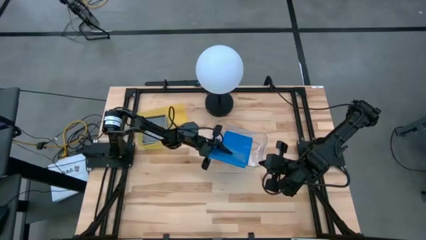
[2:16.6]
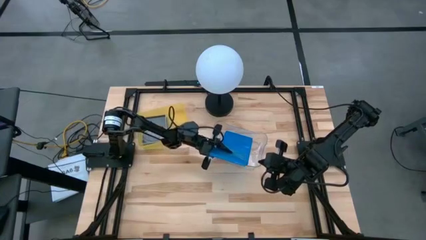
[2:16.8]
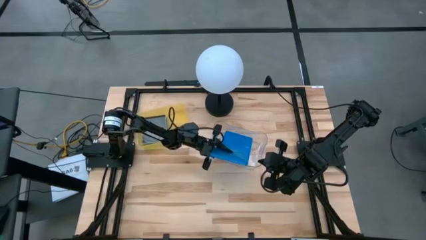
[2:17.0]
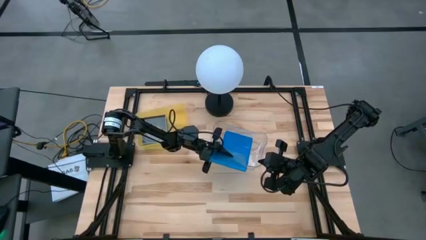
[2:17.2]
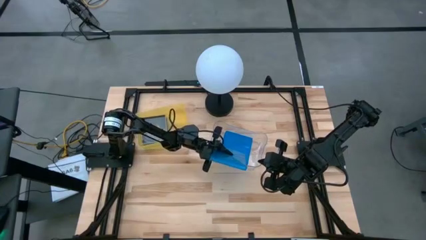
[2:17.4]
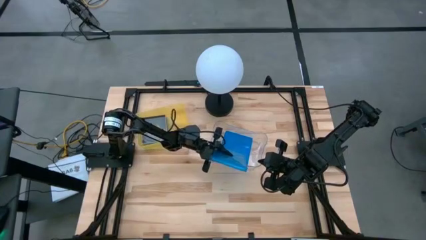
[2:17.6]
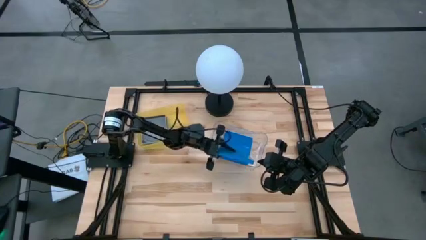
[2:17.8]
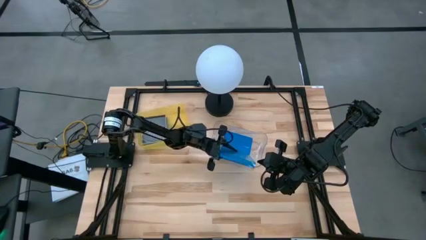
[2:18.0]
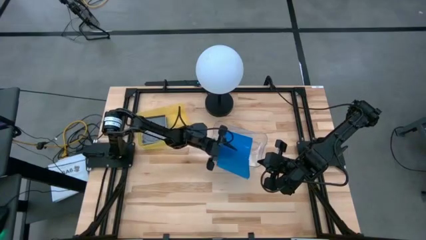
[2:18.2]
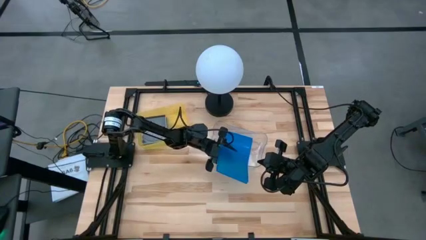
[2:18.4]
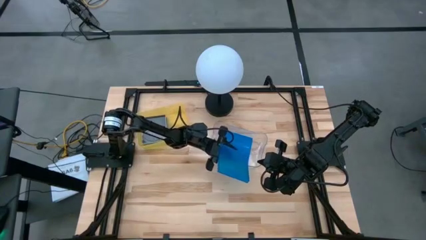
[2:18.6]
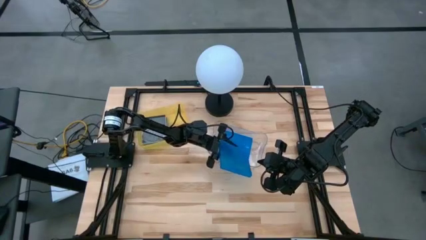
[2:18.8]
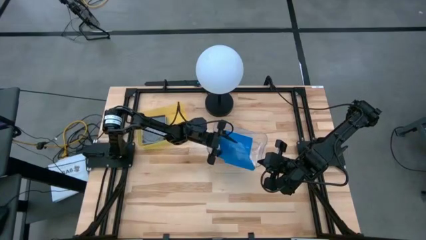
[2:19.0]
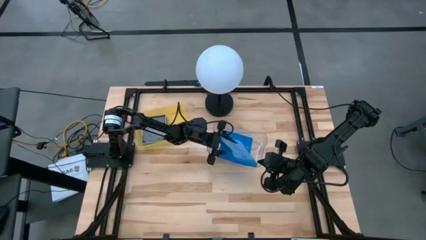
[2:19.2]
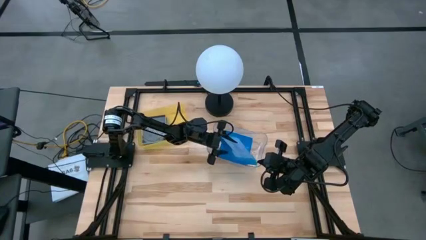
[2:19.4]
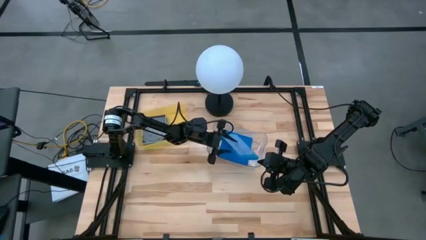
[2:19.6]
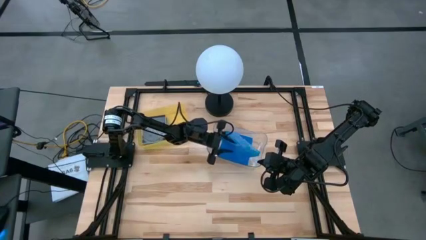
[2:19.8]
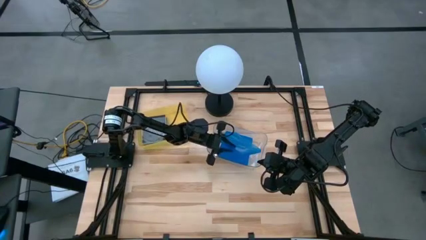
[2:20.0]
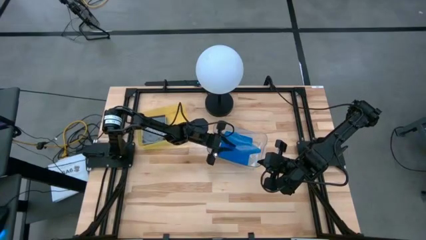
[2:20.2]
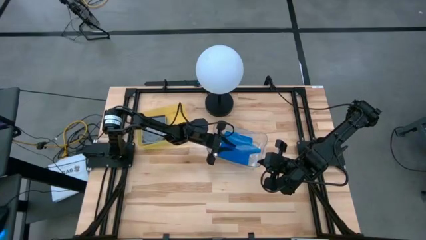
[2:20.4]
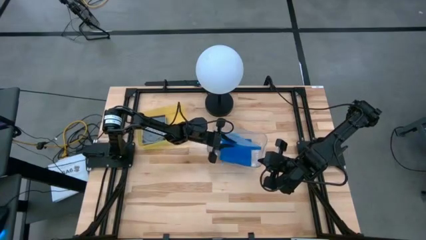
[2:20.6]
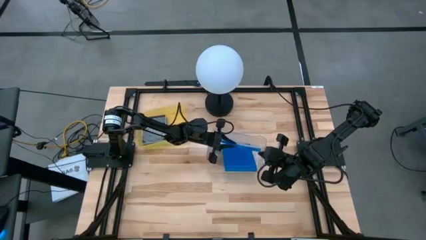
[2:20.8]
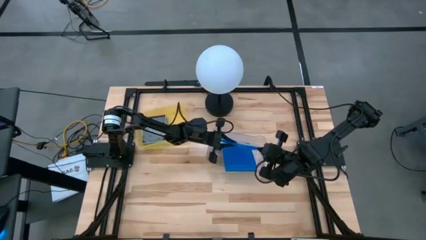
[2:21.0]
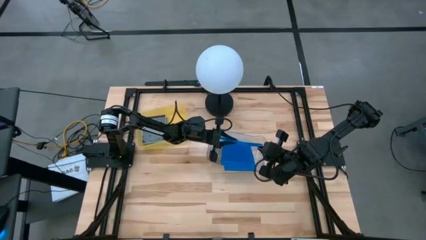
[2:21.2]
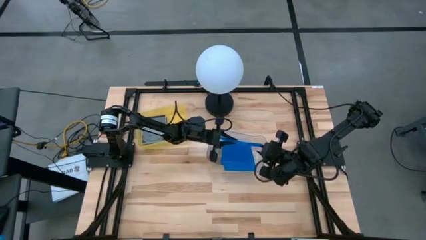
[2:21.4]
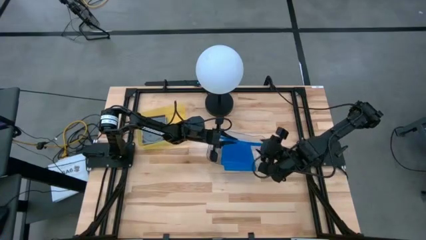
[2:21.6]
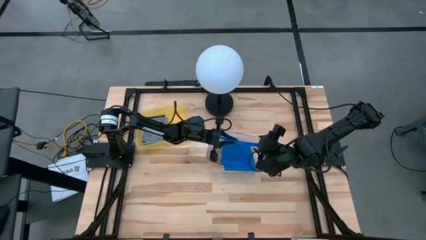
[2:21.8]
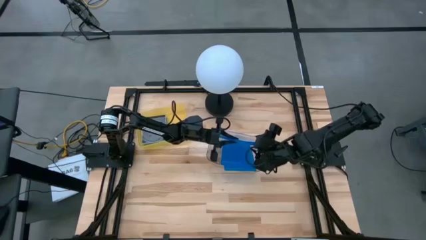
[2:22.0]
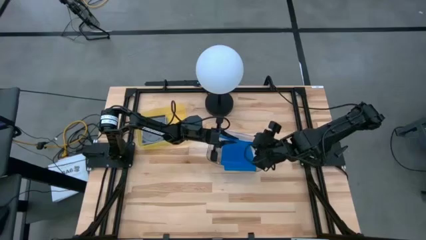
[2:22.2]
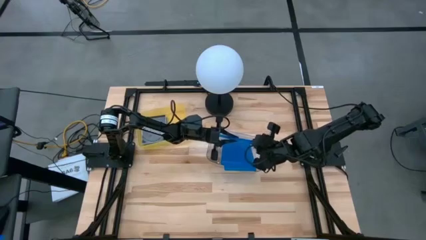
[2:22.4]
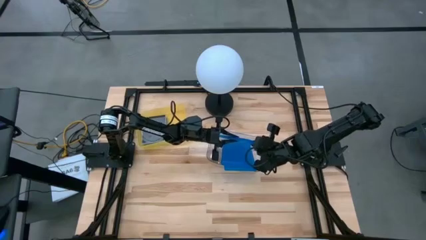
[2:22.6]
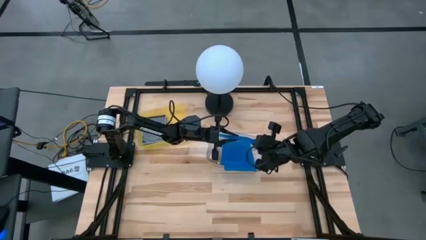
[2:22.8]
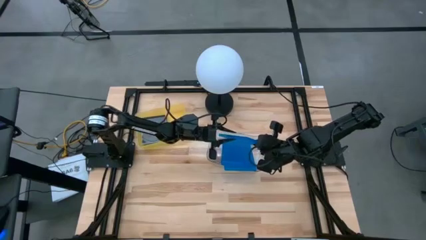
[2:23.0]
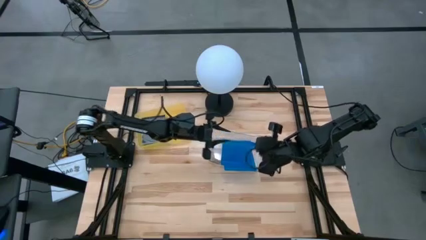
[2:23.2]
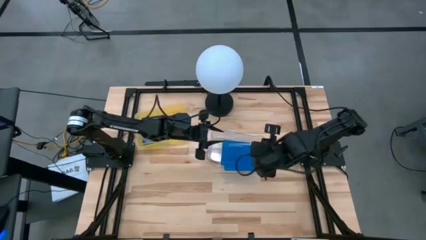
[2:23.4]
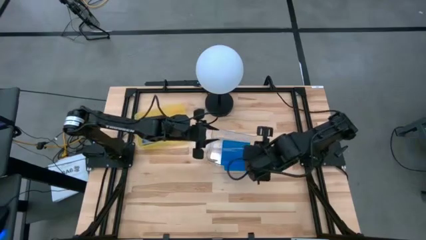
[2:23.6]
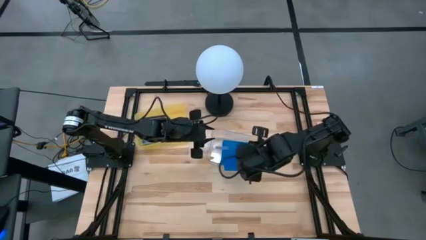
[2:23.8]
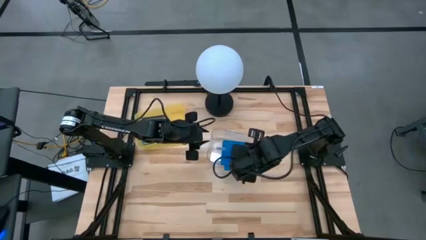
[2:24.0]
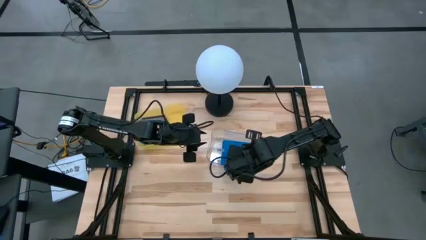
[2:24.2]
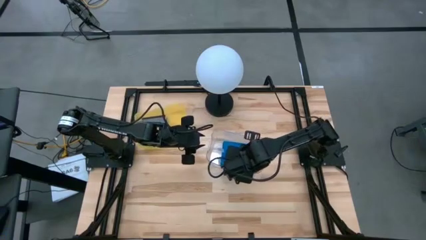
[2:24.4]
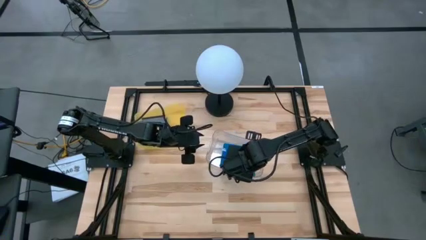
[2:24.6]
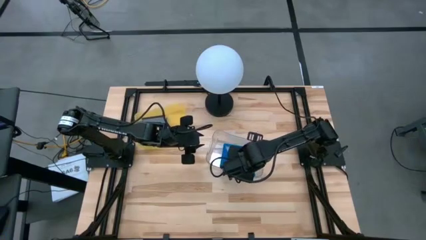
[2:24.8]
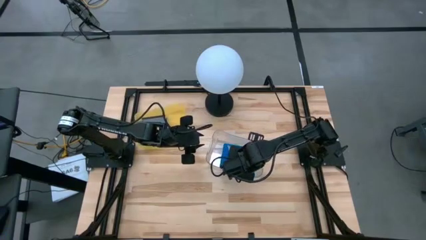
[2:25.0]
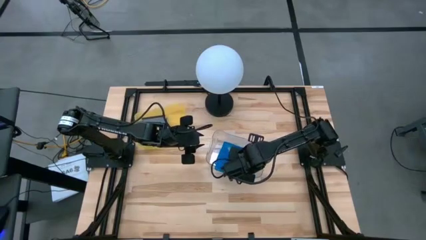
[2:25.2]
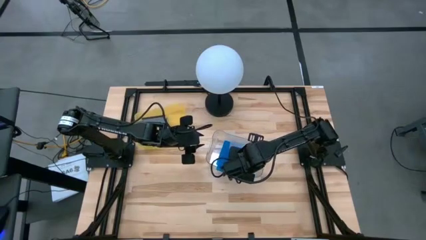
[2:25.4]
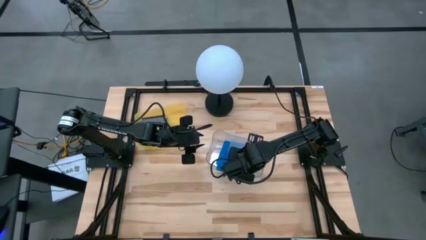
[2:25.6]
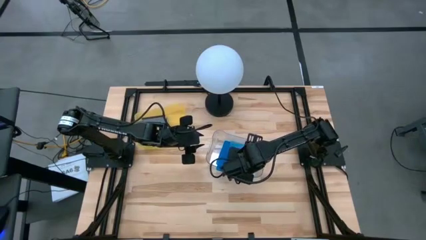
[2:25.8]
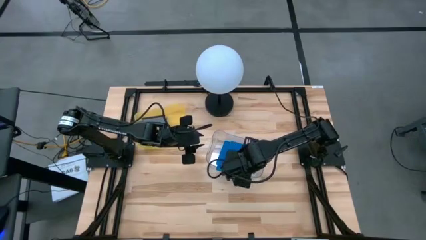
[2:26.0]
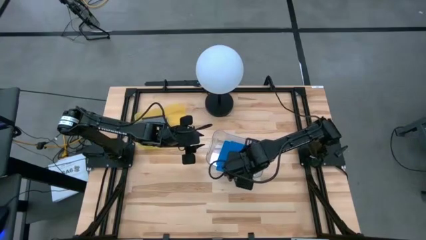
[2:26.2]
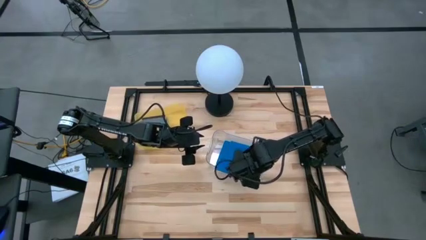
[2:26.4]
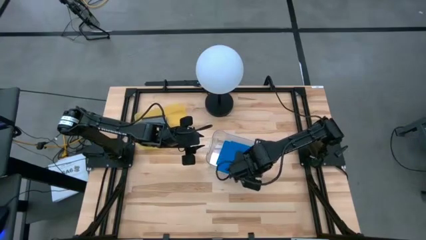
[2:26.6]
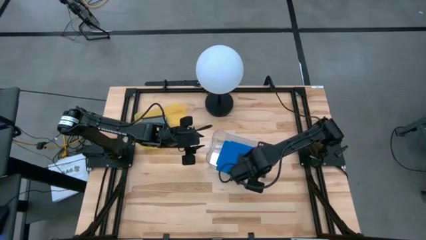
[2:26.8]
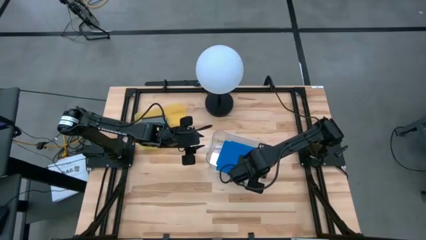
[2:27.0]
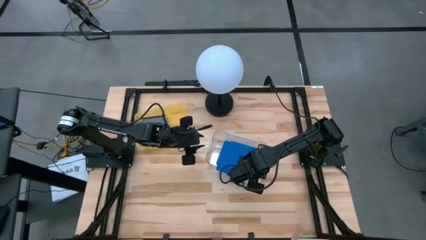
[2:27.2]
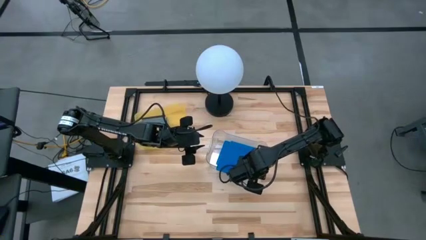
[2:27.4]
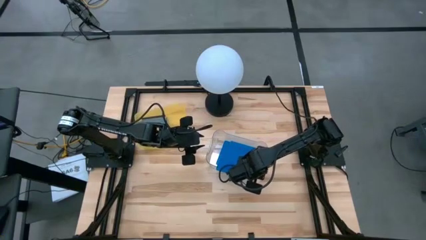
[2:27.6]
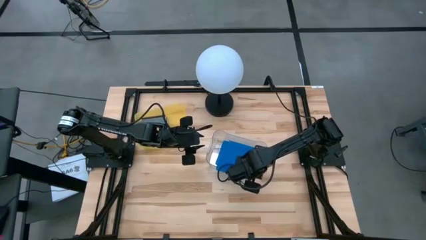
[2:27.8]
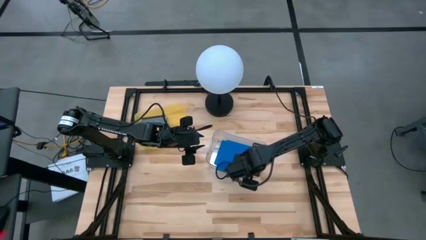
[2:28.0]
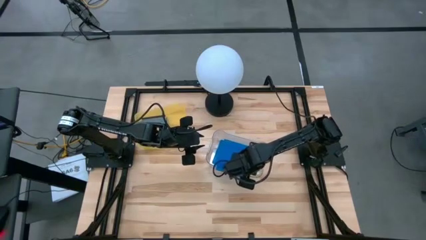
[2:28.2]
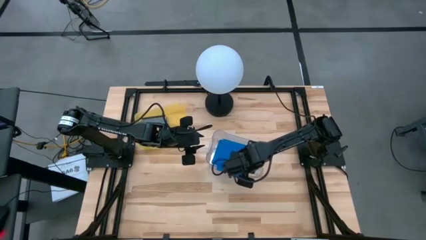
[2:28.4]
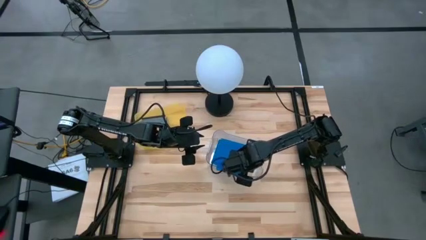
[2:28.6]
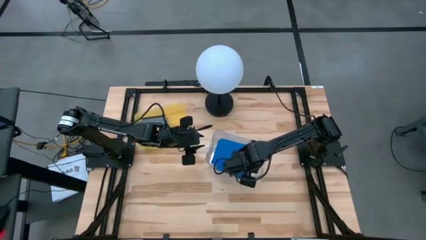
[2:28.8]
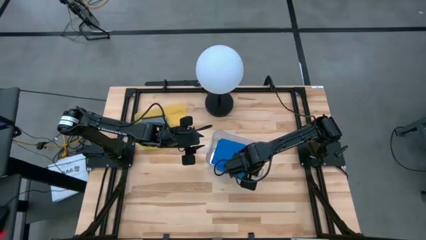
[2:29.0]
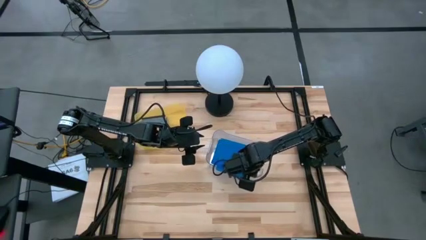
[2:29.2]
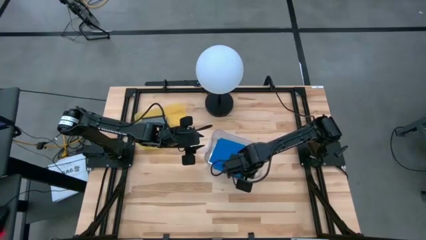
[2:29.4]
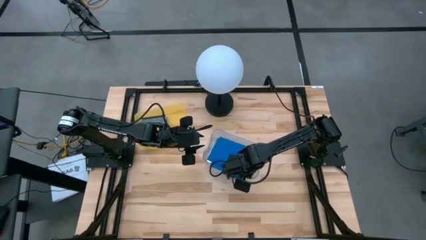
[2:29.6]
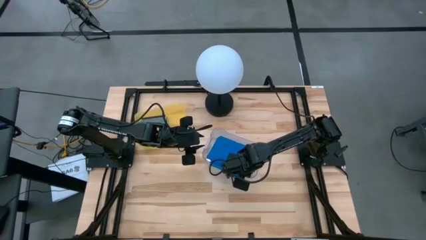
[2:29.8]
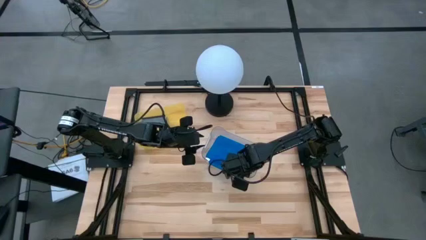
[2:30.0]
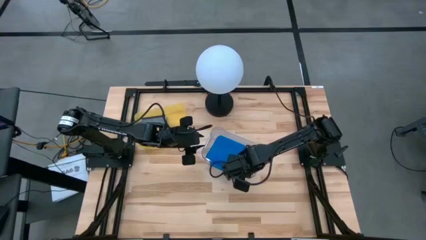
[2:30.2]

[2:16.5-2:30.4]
Task: Pick & place jewel cases by type
Put the blue CD case into the transparent bin
